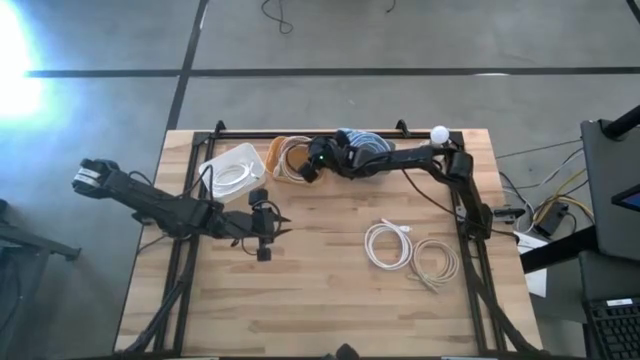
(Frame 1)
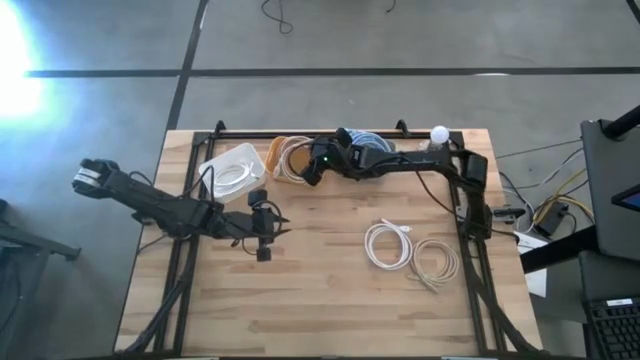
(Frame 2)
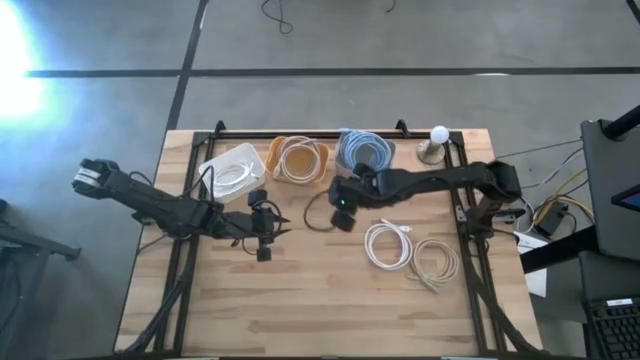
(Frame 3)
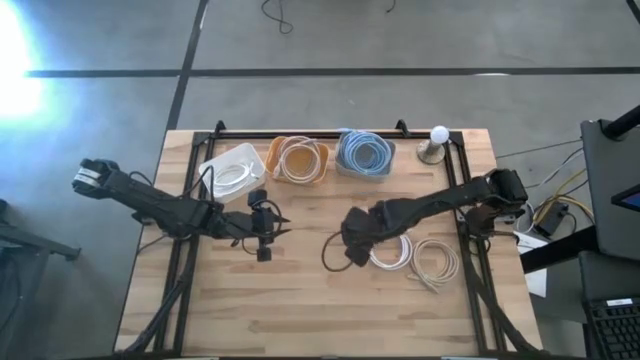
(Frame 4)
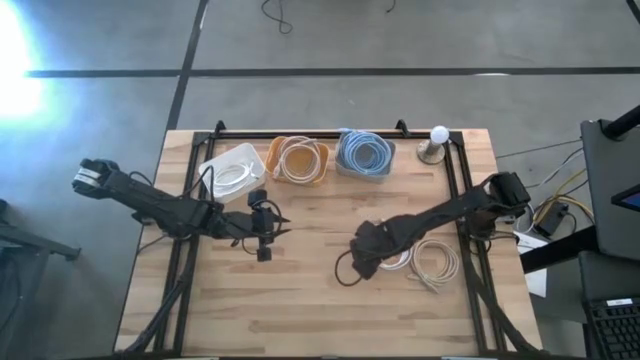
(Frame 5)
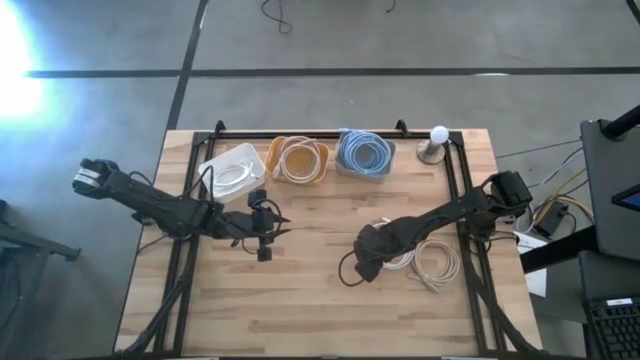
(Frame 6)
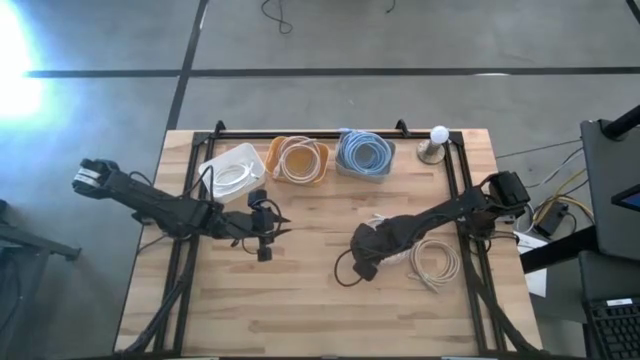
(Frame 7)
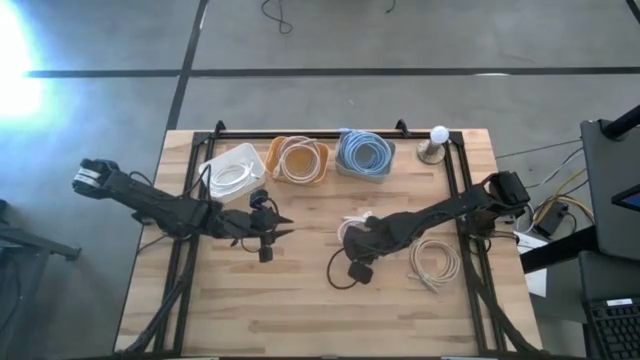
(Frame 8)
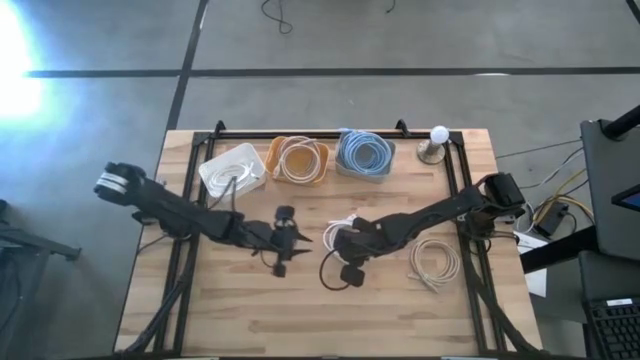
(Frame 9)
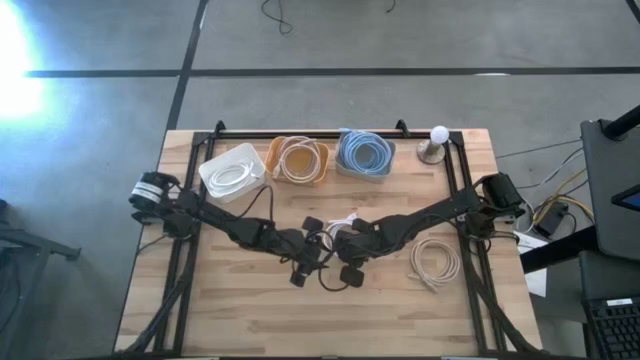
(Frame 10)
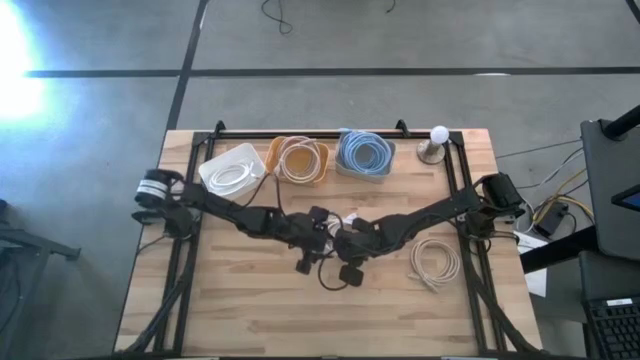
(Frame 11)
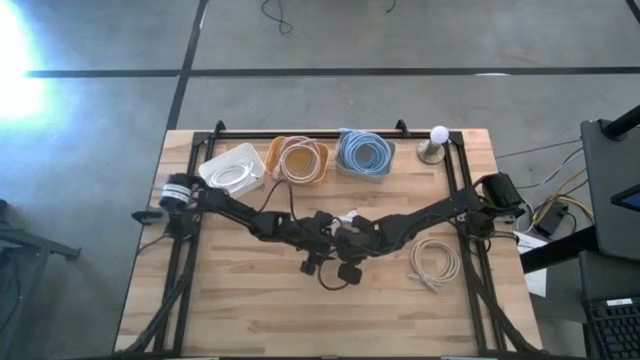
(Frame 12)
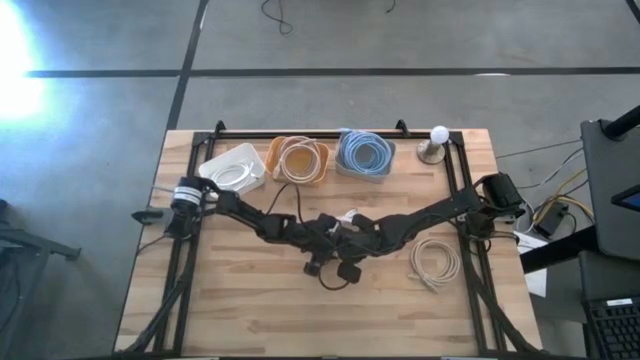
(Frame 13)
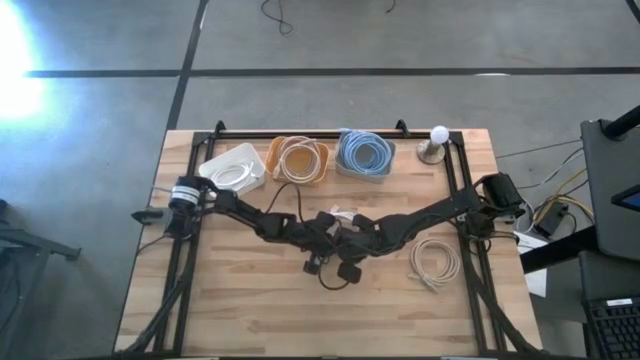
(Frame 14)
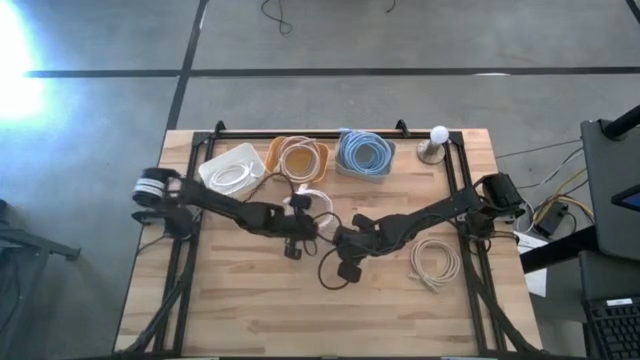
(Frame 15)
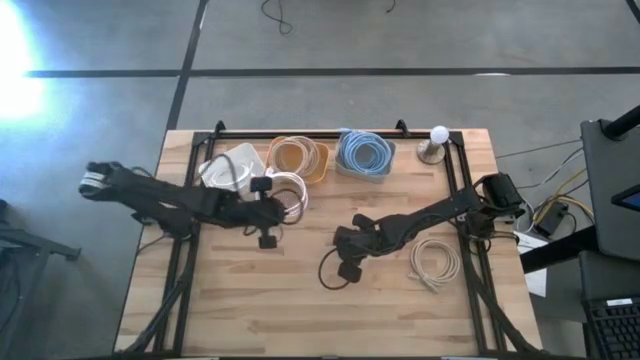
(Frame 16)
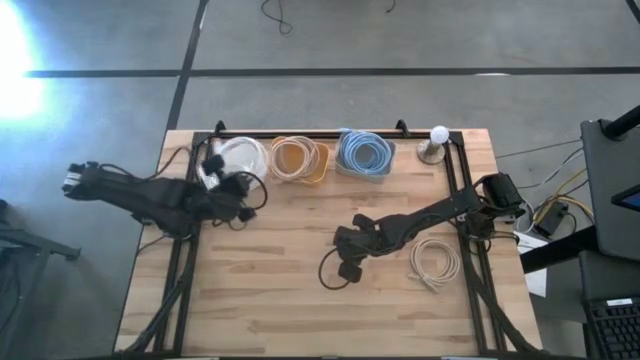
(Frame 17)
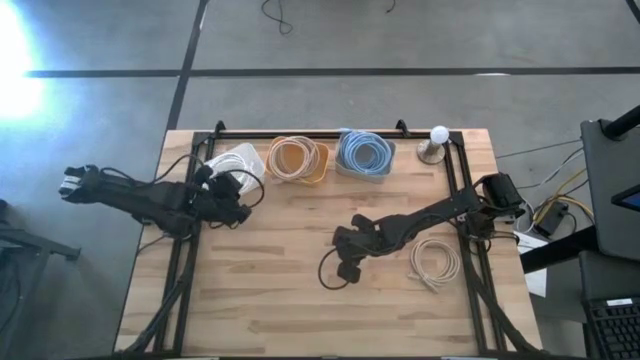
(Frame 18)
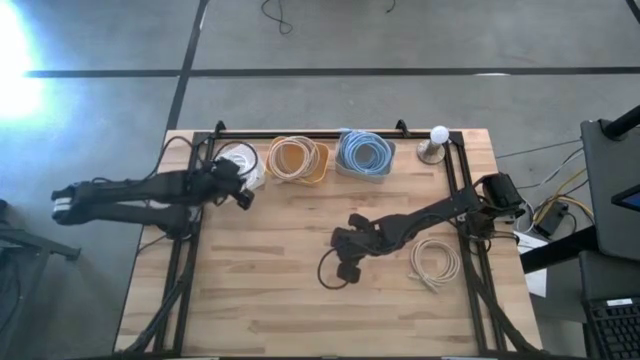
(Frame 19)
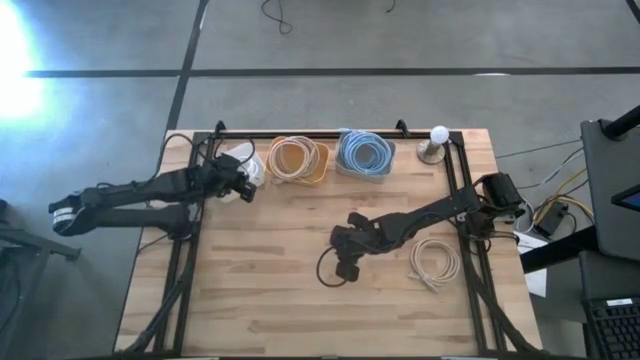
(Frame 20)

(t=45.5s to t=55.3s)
Task: Pick & Place USB Port
Put the white display cable into the white bin

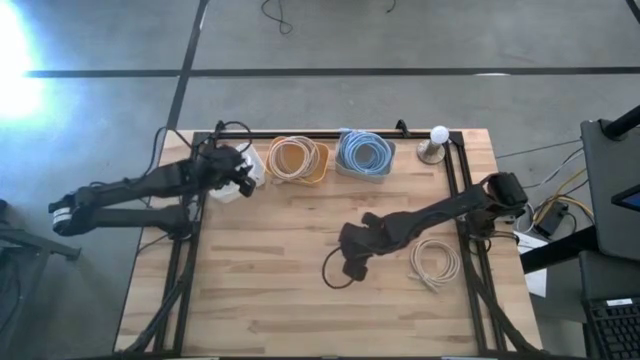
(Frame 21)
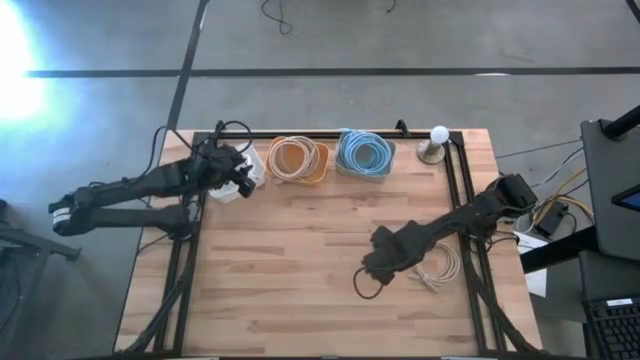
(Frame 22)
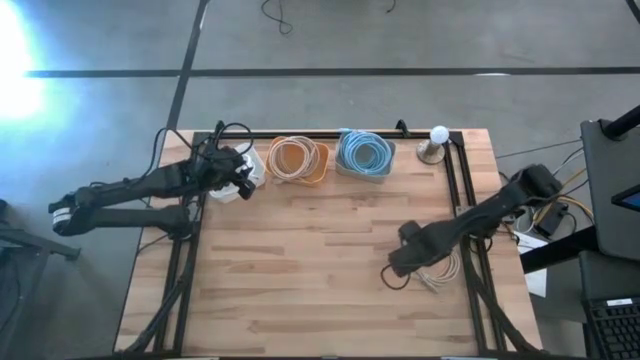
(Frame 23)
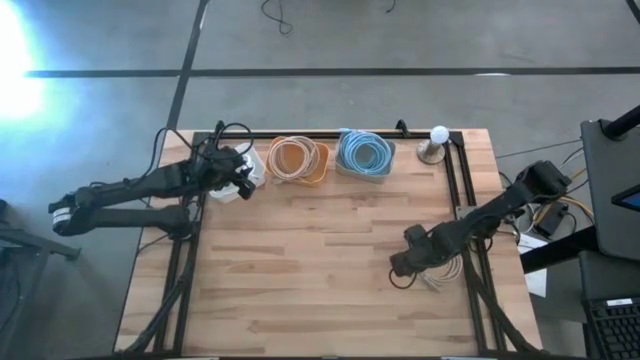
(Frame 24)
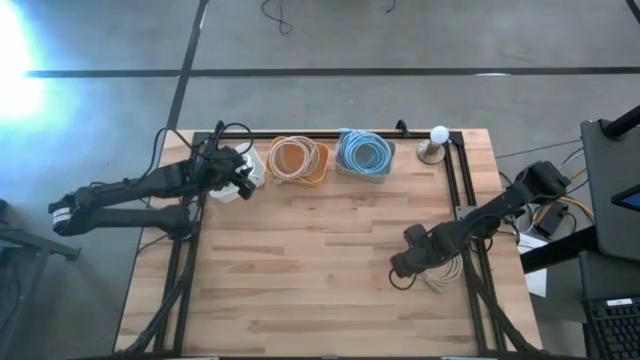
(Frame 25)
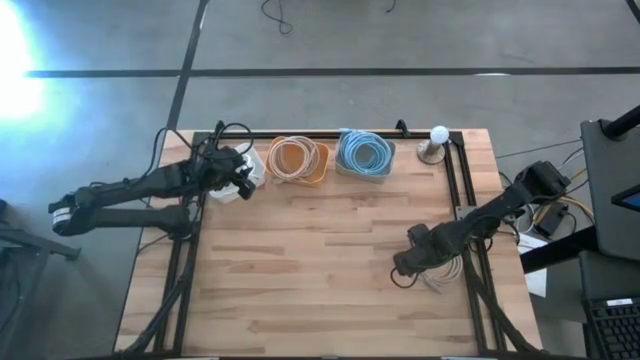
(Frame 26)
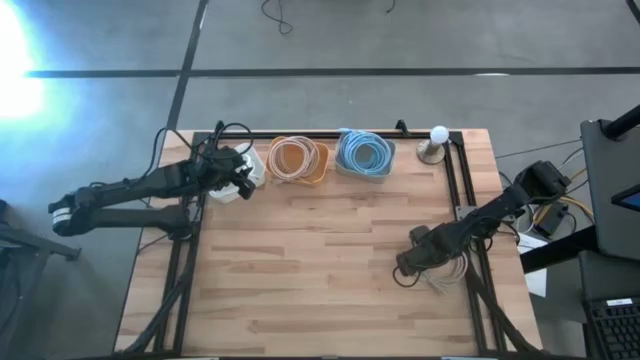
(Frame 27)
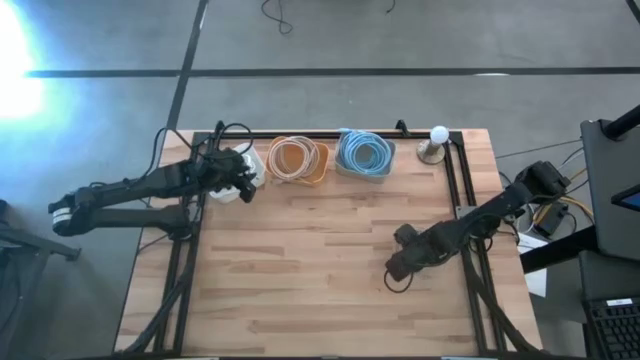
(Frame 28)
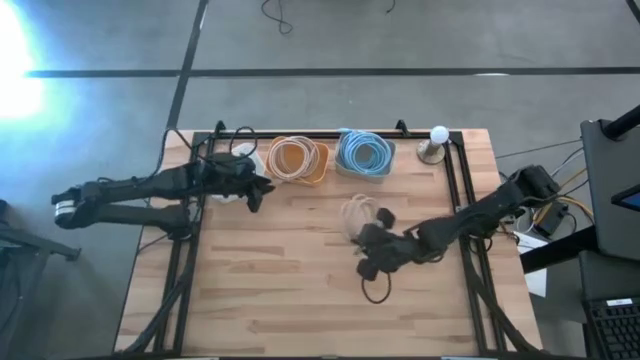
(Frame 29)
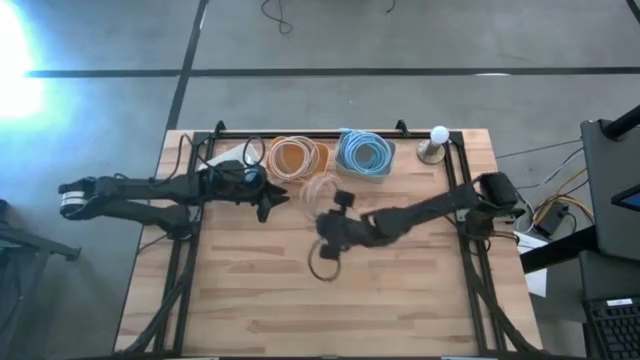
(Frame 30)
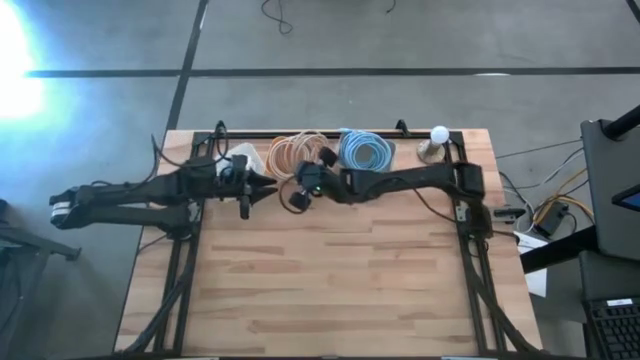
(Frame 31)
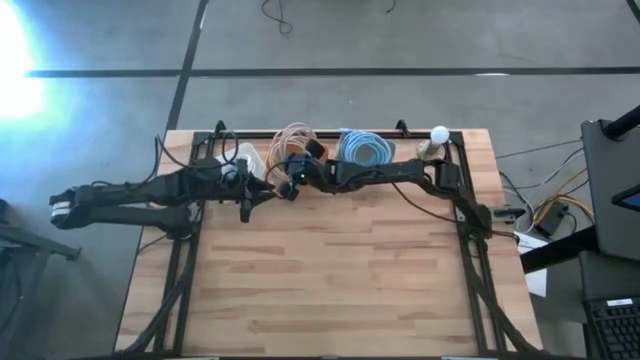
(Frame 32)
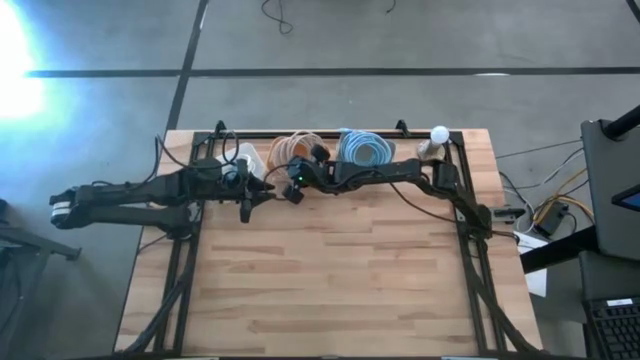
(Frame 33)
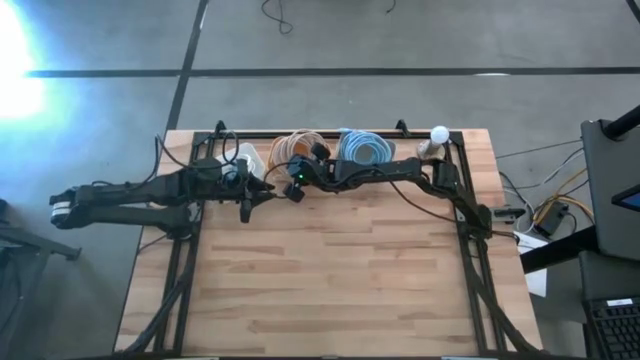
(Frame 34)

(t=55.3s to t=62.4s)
Put the brown display cable into the yellow bin

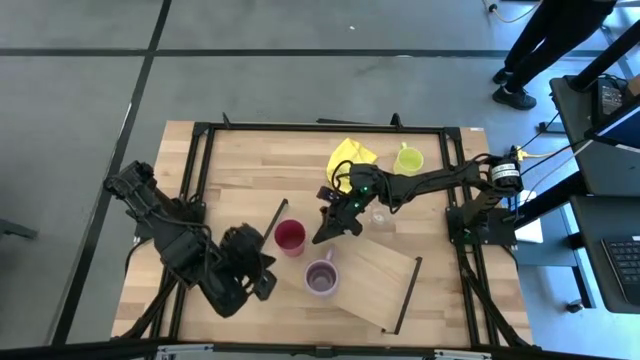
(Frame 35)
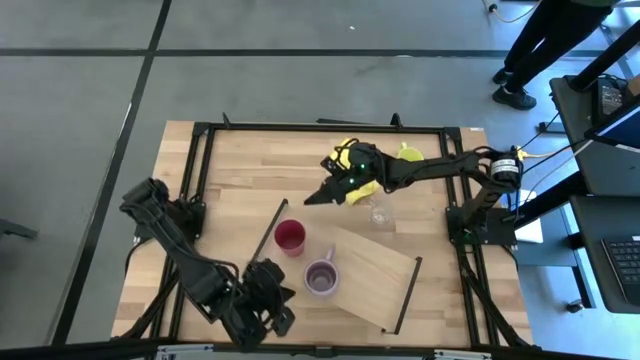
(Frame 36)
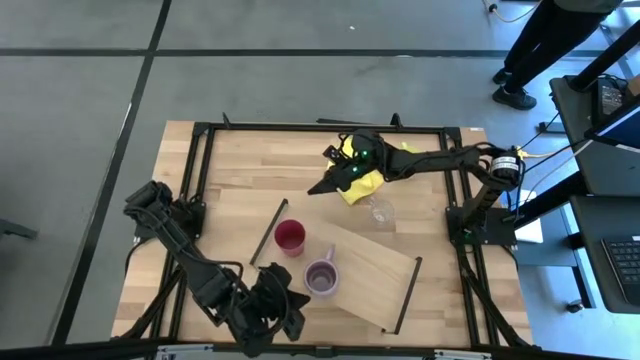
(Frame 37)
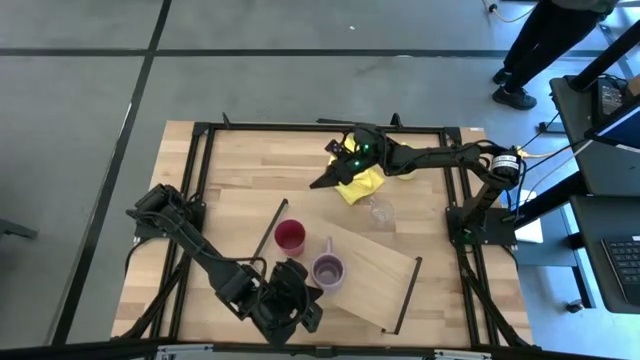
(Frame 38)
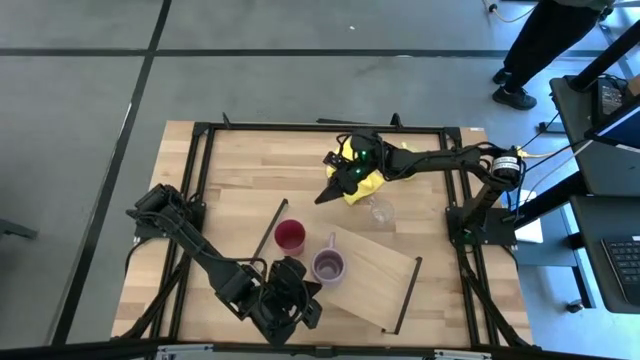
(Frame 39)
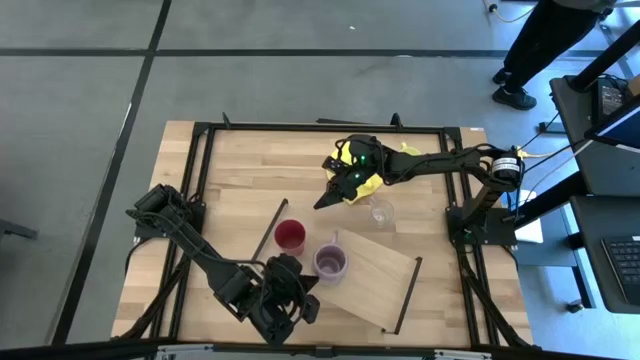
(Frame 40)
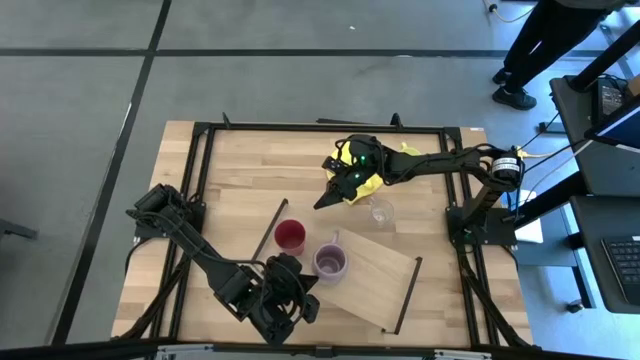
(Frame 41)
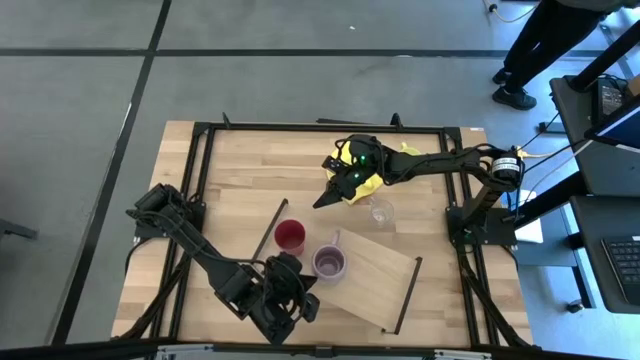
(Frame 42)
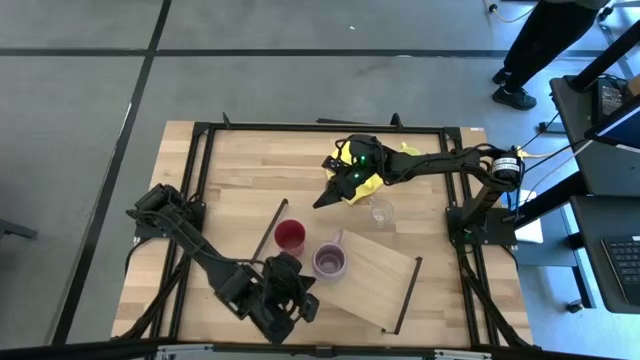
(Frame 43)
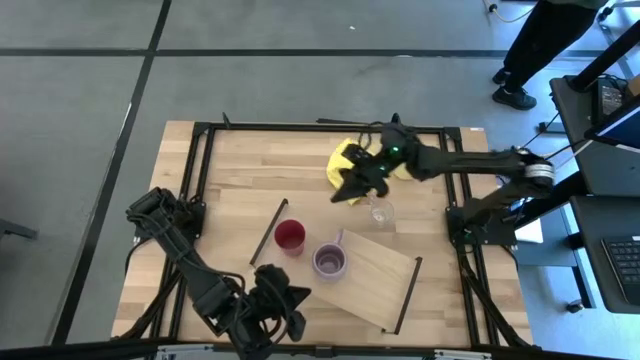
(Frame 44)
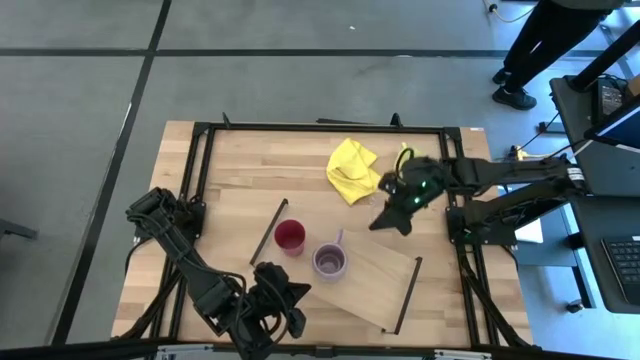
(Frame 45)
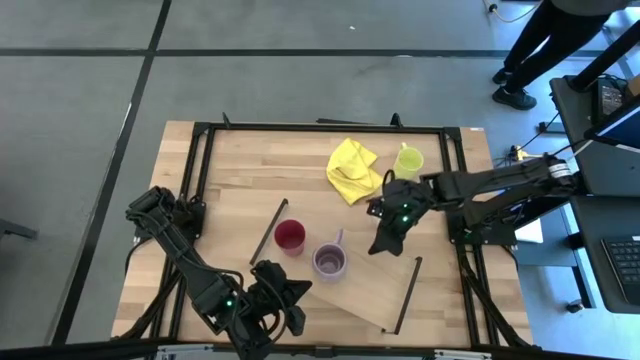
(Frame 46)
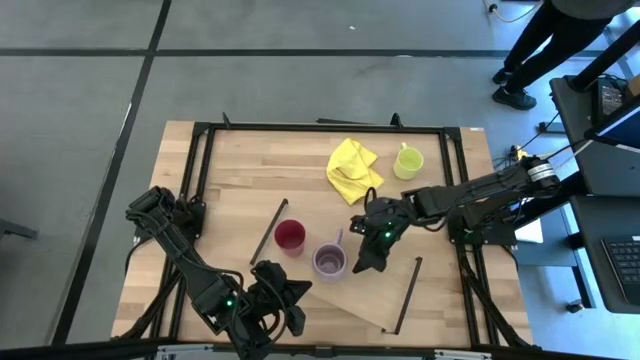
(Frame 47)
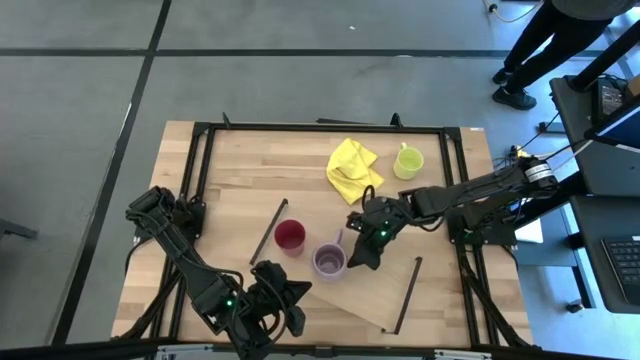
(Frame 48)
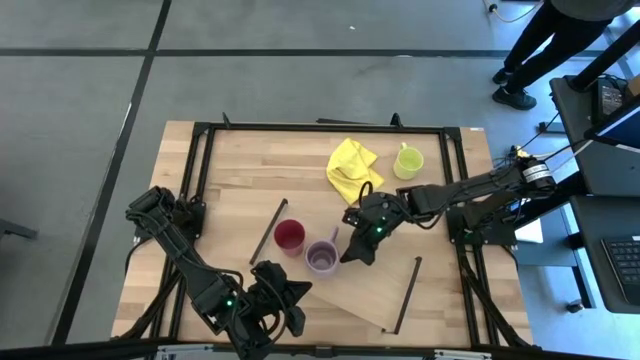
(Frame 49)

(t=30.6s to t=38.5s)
Task: Stack small to large cups/mugs on shelf
Adjust the purple mug on the shelf
